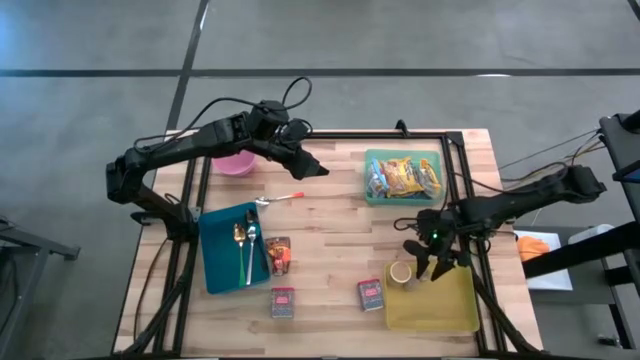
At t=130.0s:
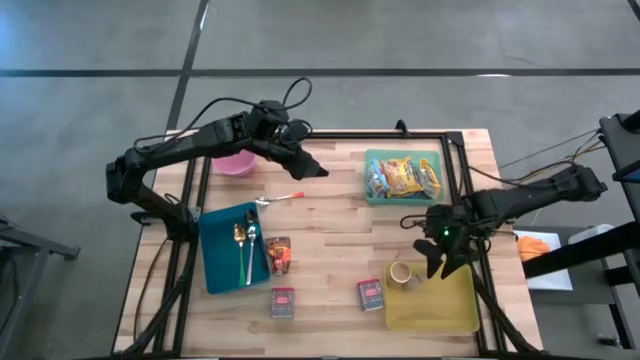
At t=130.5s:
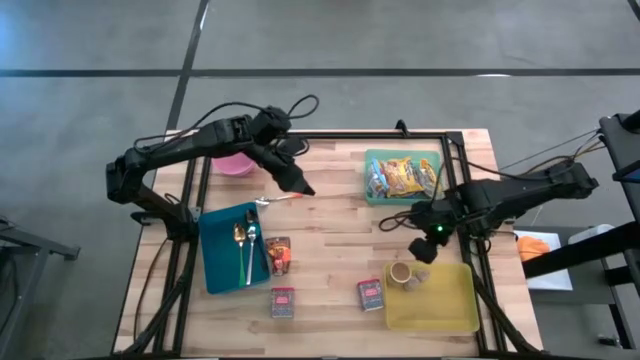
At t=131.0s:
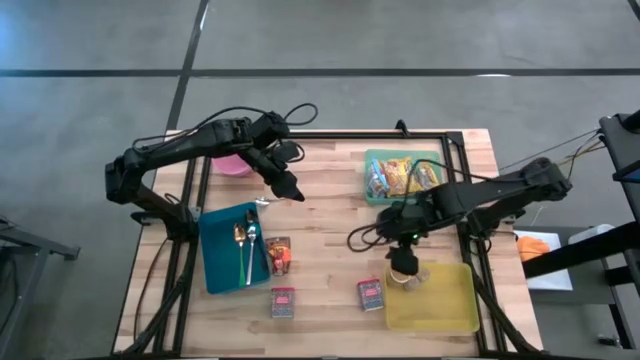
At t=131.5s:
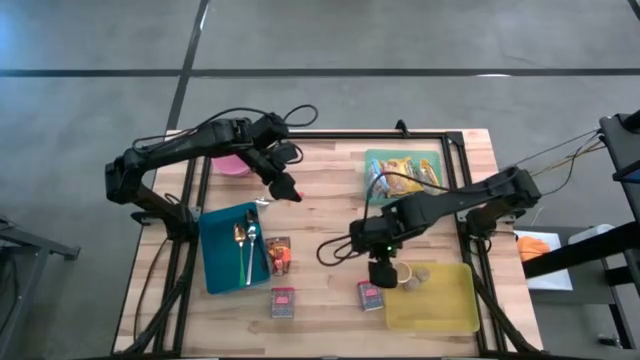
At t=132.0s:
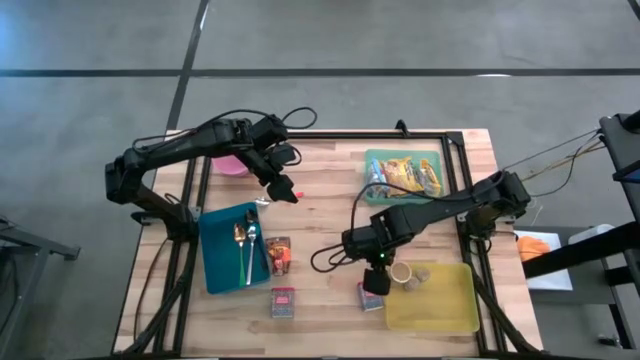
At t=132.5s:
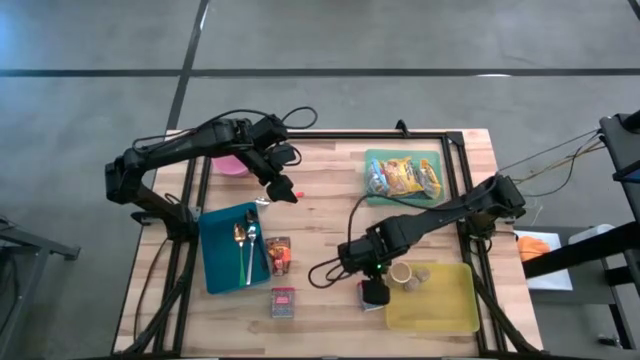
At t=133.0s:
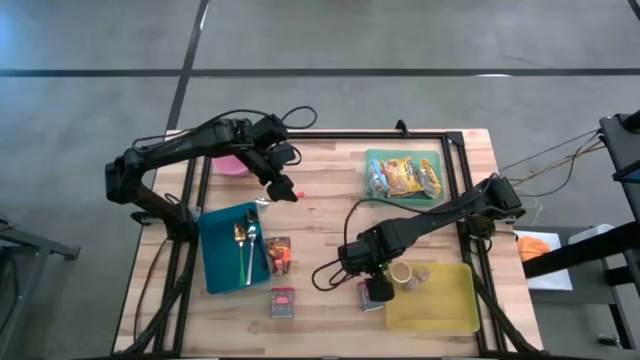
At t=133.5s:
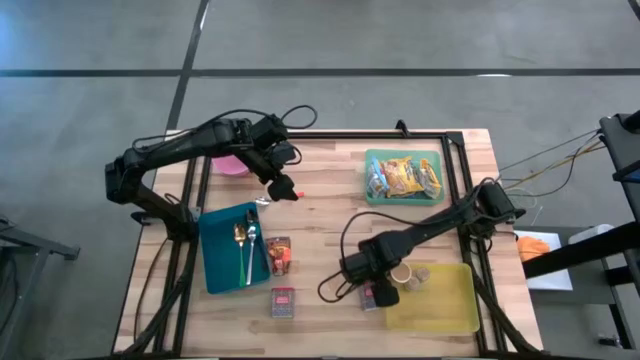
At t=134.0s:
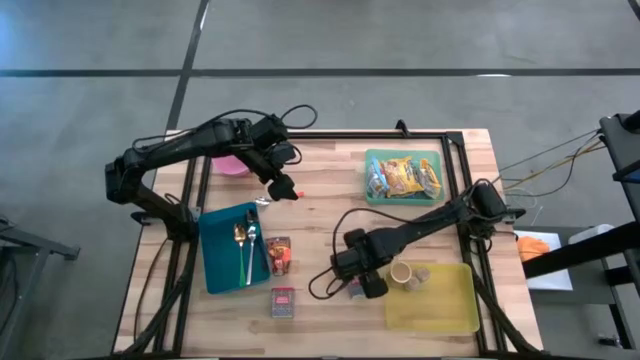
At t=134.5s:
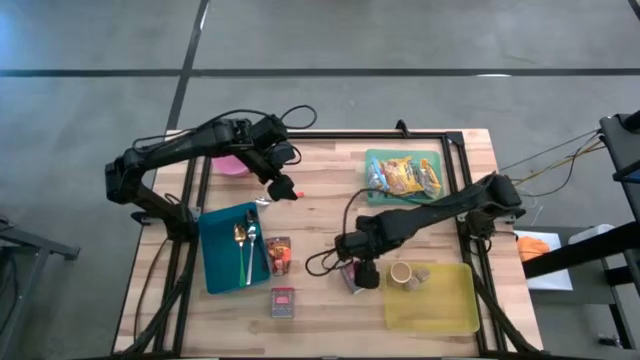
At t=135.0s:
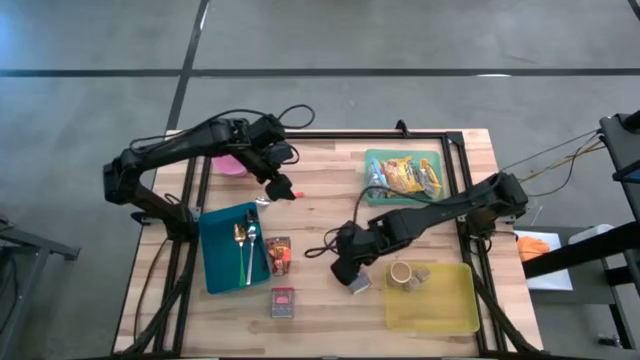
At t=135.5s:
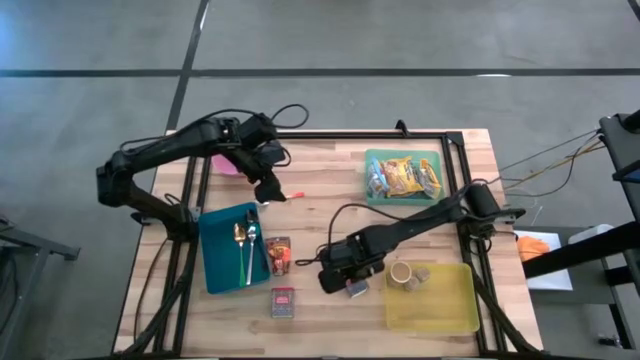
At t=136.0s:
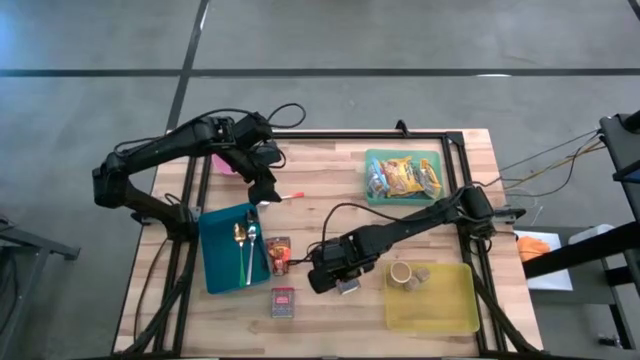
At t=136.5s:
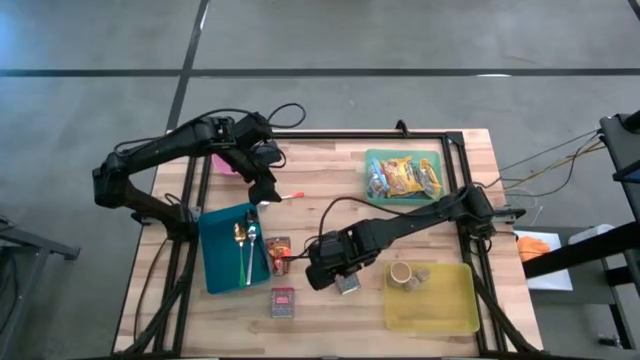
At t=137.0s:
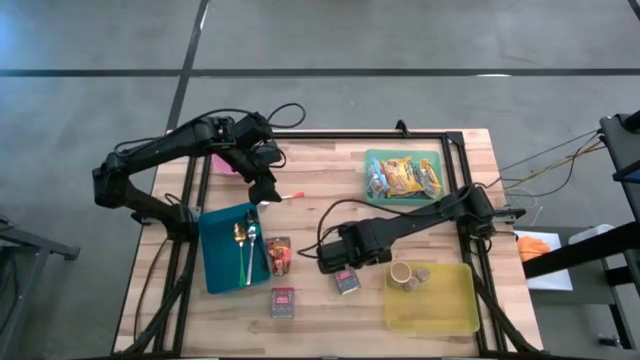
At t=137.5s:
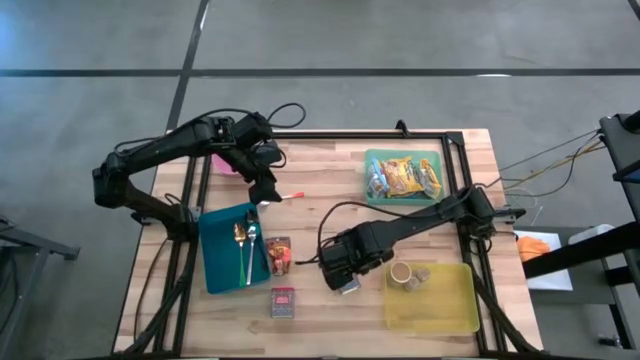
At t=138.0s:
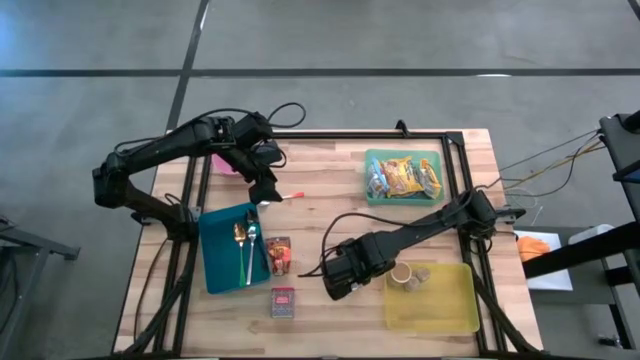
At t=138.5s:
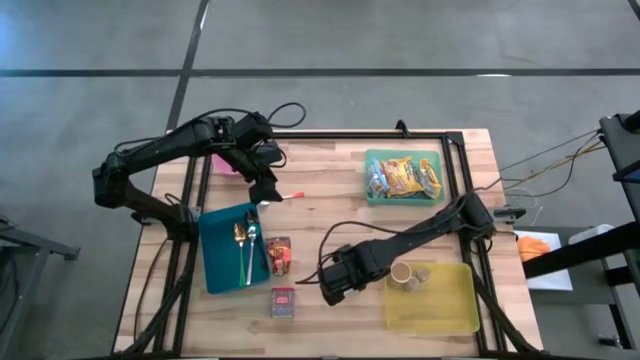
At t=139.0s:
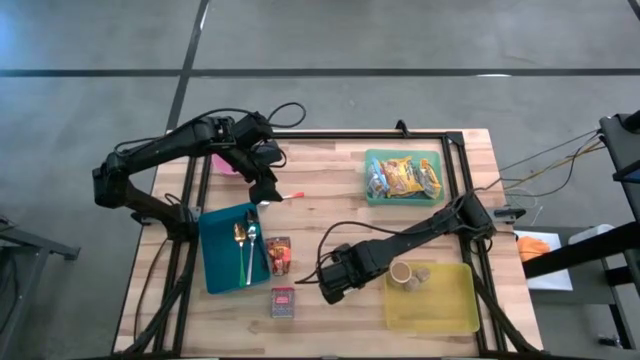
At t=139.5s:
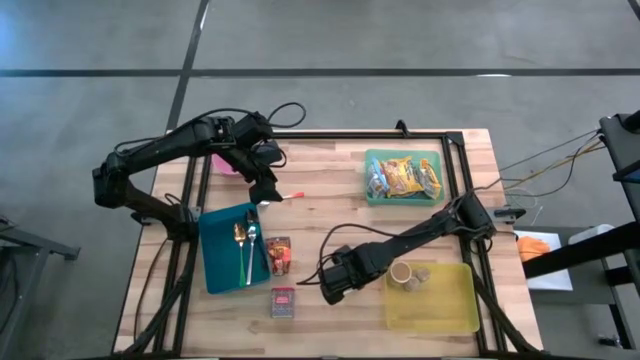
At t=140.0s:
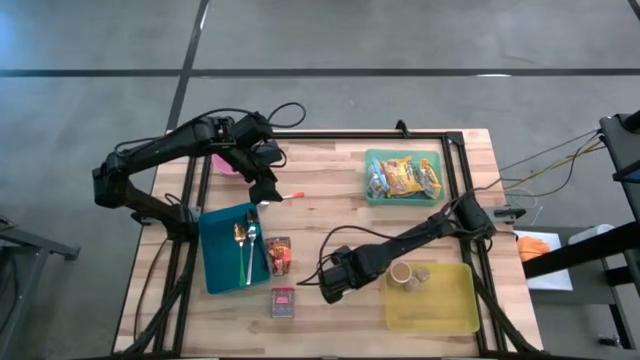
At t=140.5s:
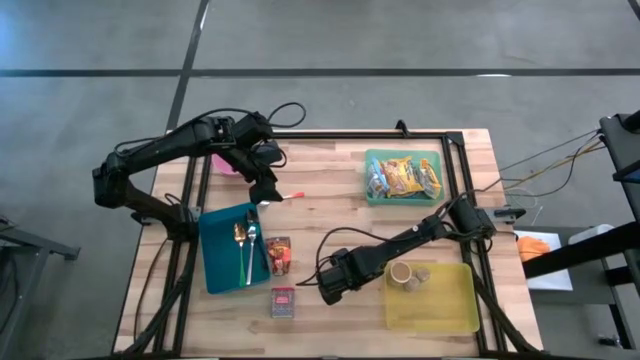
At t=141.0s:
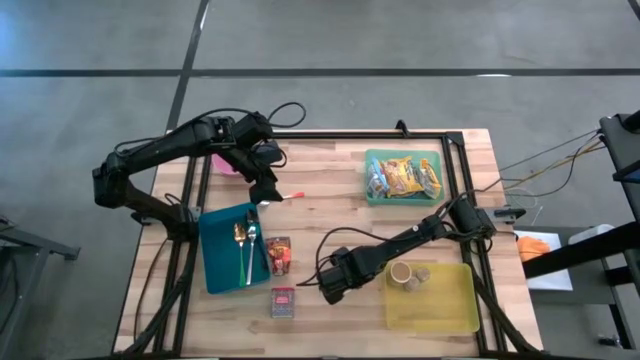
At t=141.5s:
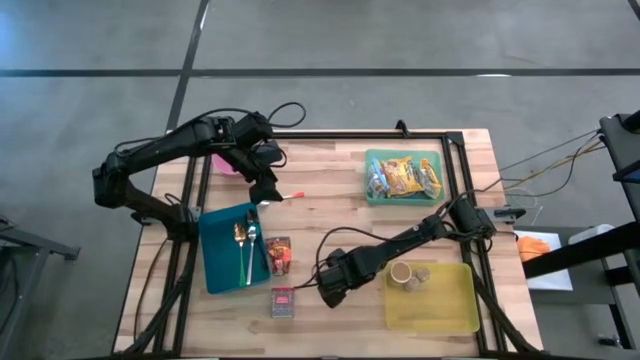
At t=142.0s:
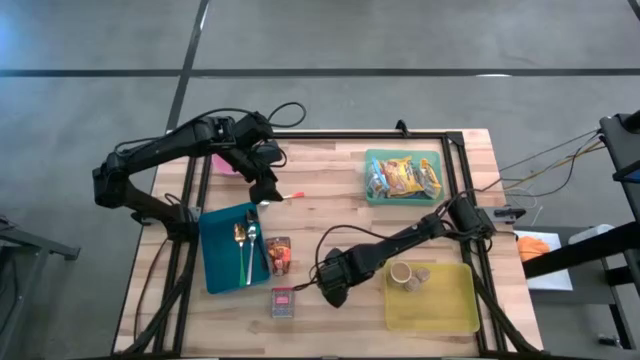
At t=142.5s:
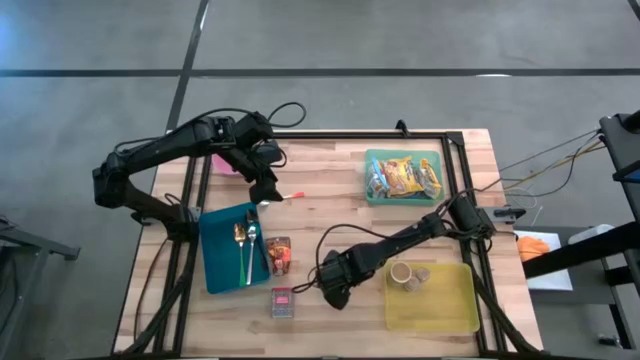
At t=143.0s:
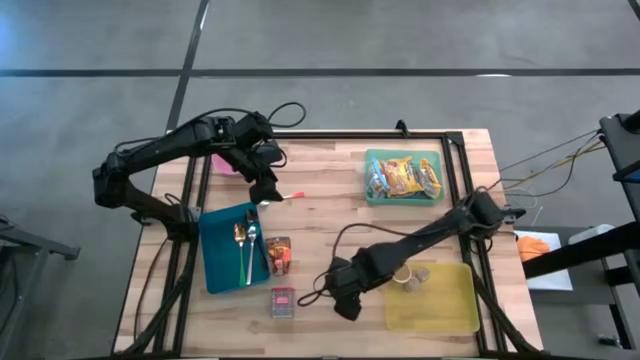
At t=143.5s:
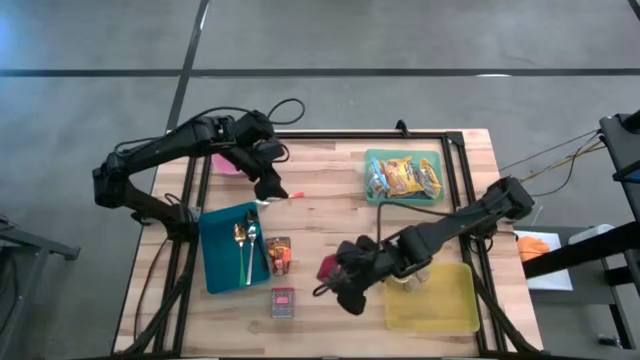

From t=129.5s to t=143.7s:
Put the right red spice can into the yellow bin
